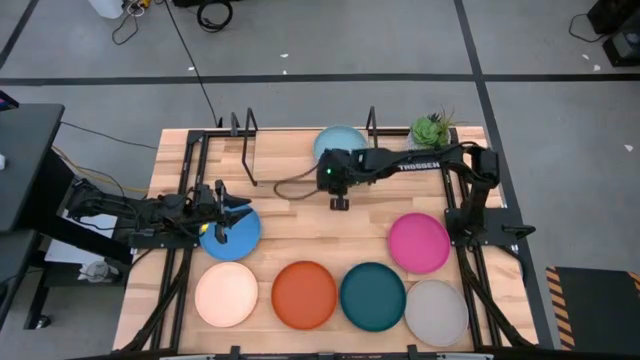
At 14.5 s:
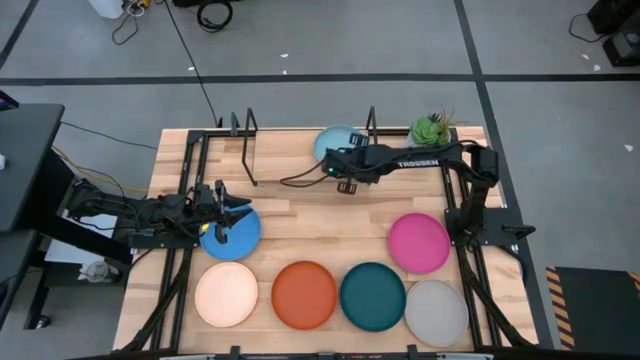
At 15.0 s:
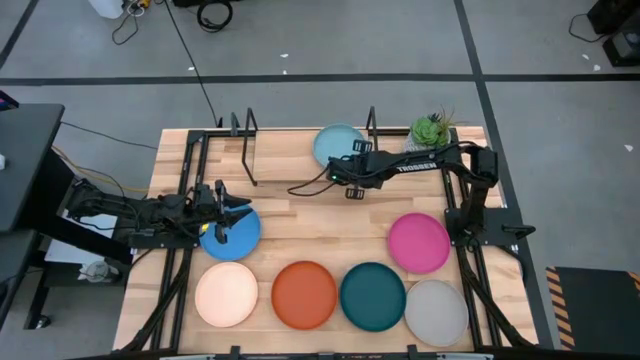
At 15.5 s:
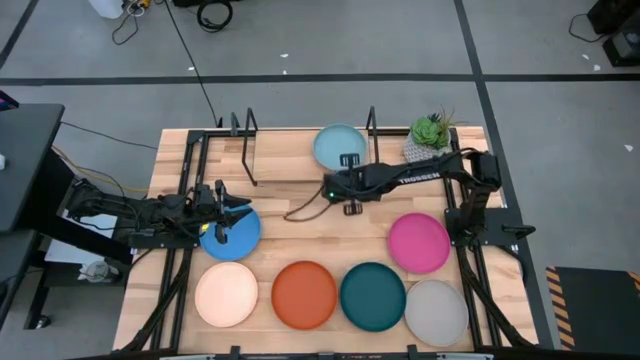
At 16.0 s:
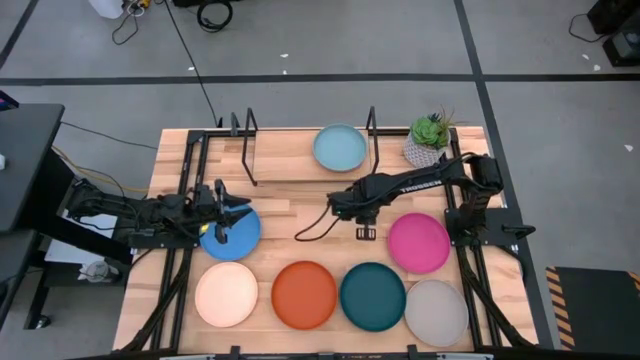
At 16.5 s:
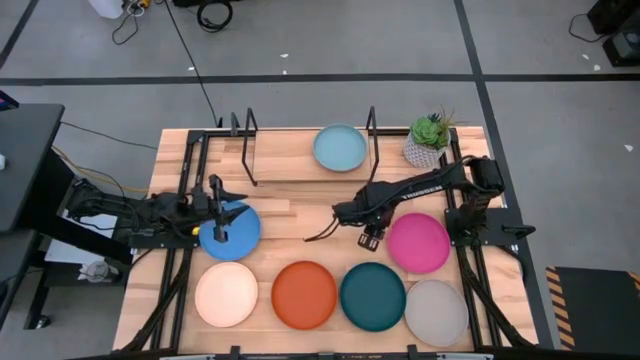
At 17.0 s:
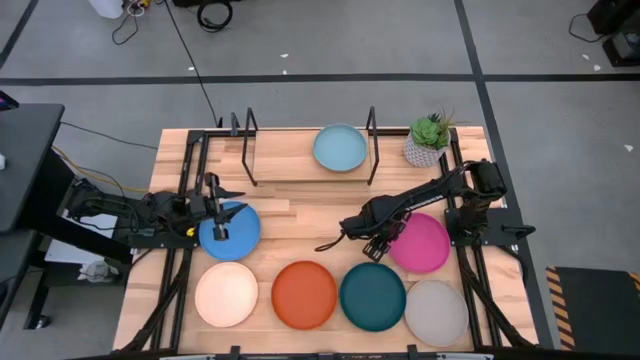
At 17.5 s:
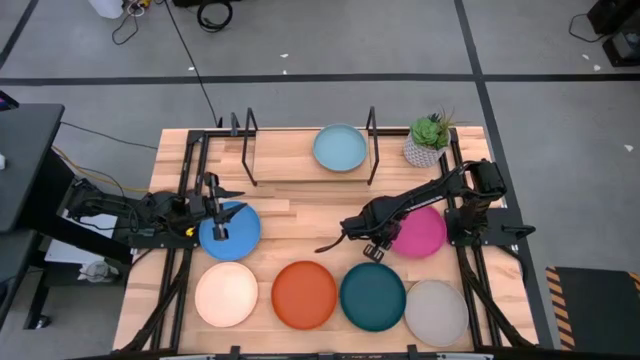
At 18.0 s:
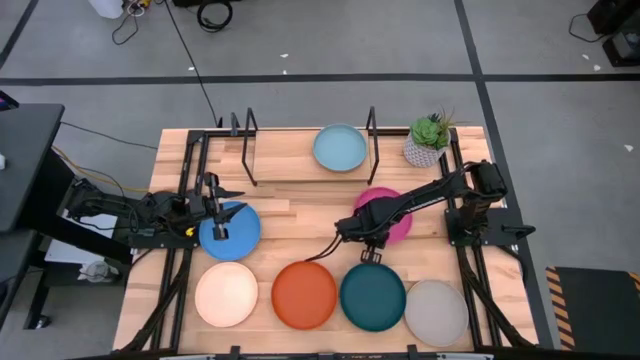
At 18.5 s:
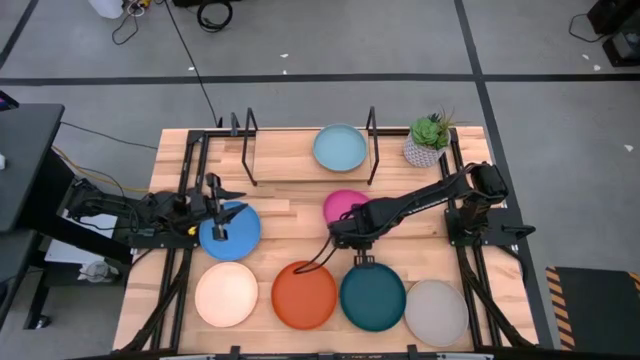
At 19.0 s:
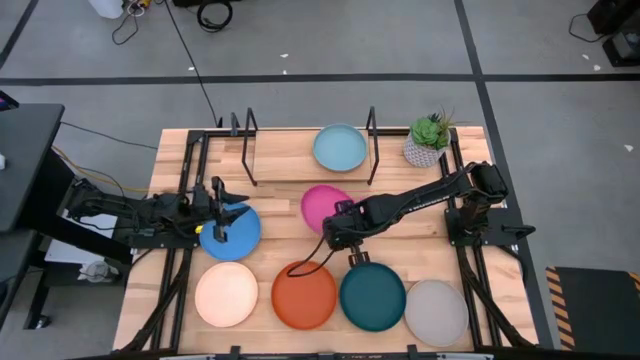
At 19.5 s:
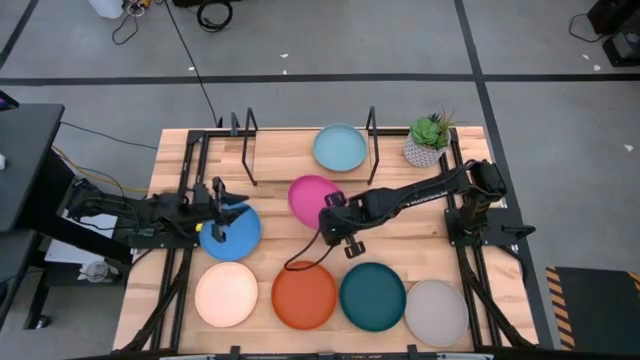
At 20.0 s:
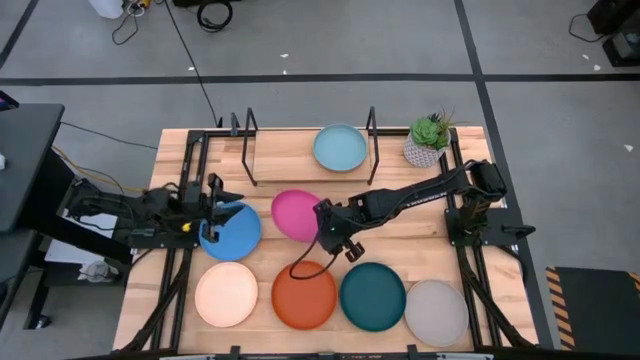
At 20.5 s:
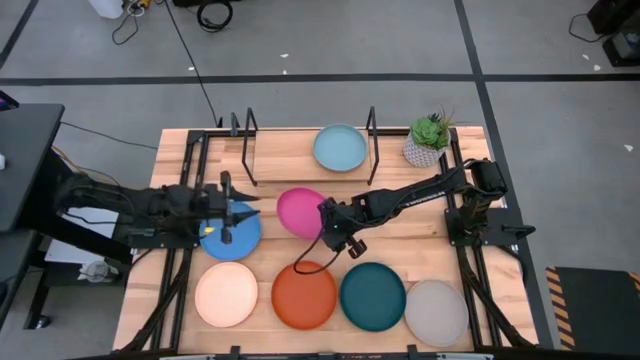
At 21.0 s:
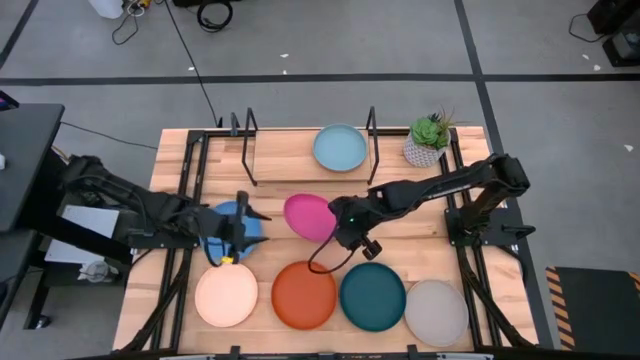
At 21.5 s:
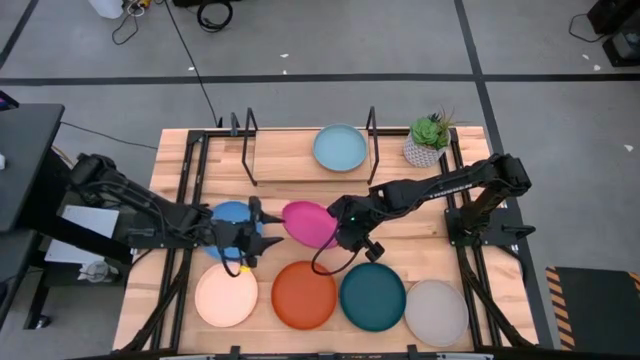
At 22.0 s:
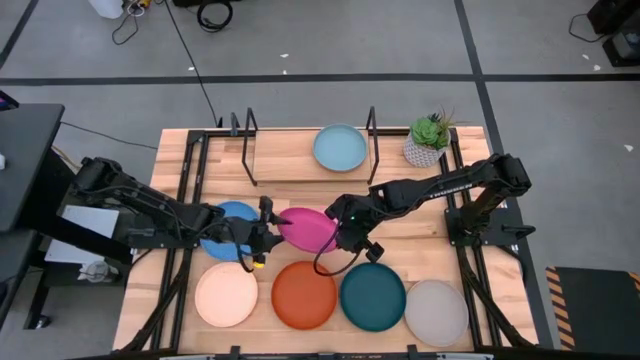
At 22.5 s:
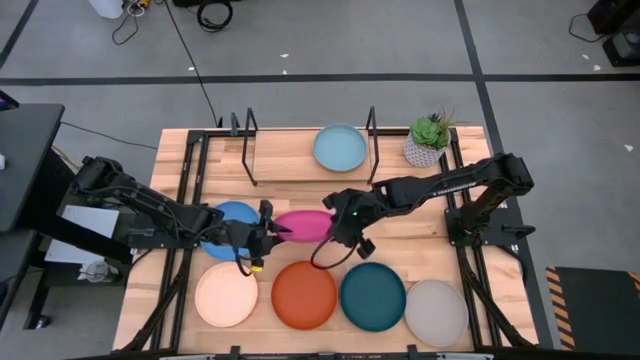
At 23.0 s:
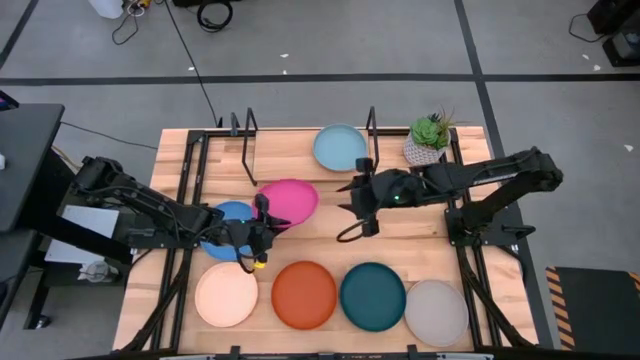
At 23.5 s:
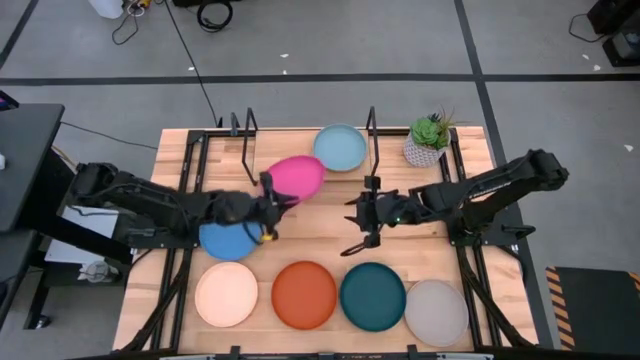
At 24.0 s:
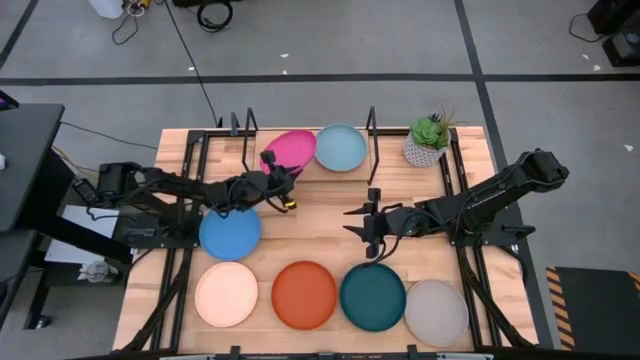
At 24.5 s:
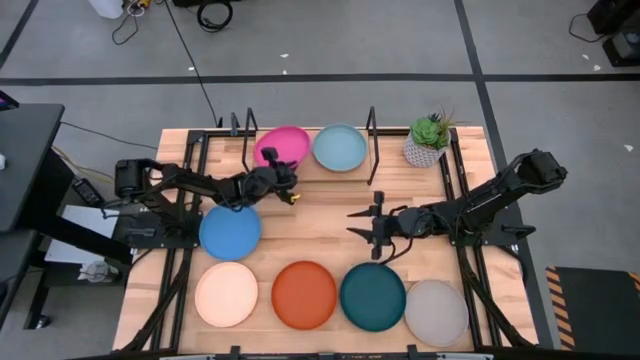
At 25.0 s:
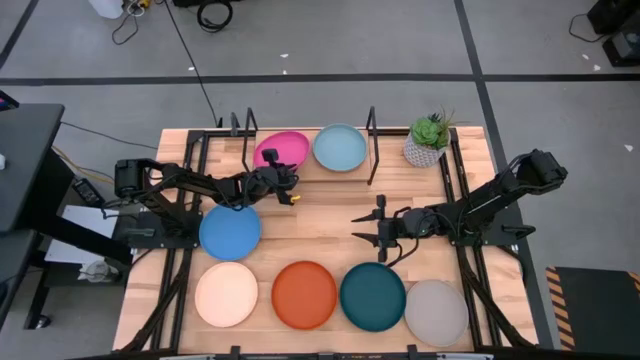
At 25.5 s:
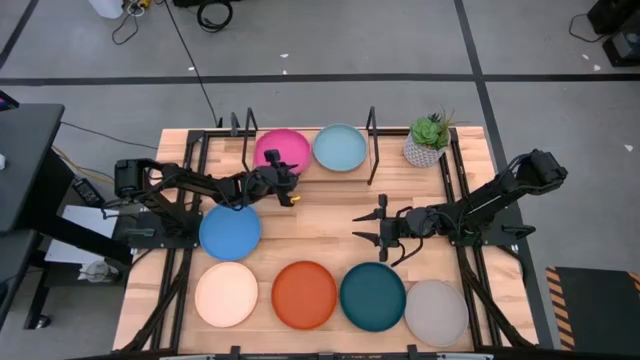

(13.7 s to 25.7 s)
Task: Place and stack plates onto a shelf
Put the pink plate on the shelf

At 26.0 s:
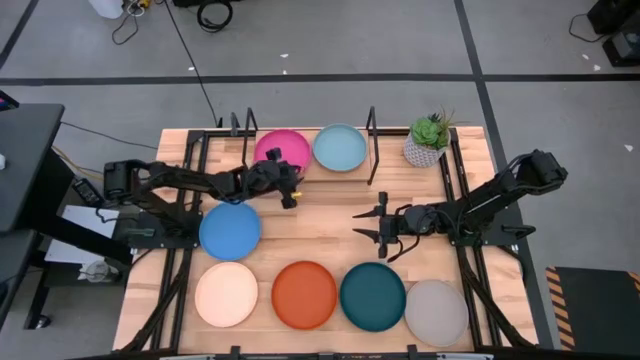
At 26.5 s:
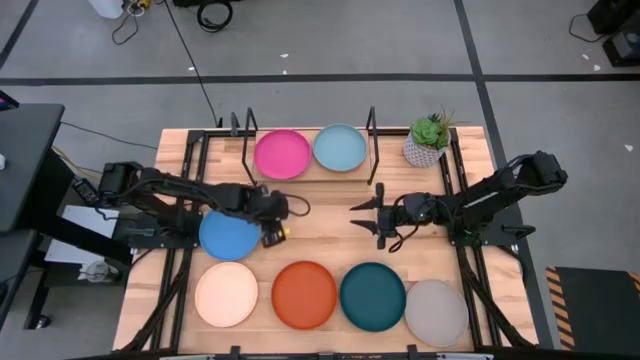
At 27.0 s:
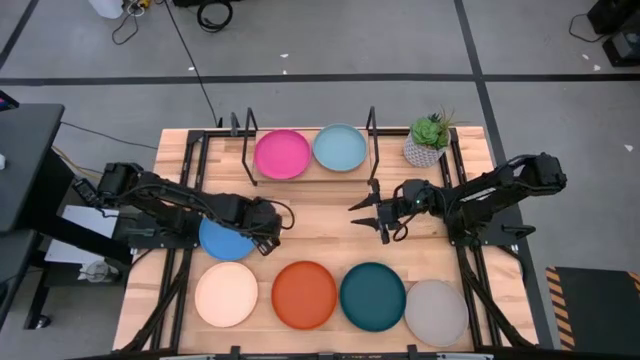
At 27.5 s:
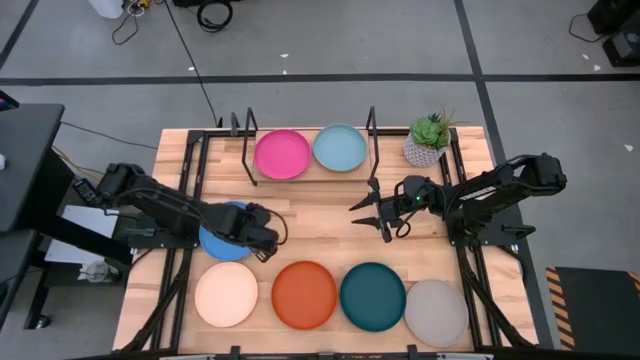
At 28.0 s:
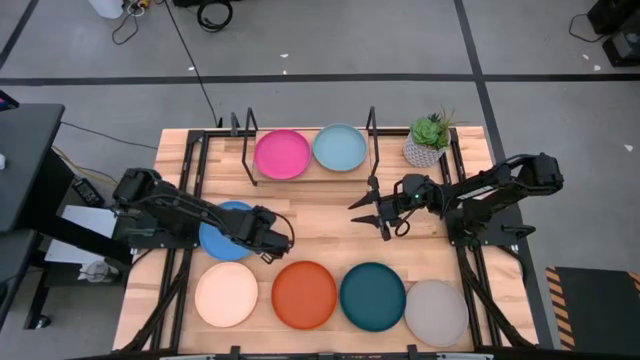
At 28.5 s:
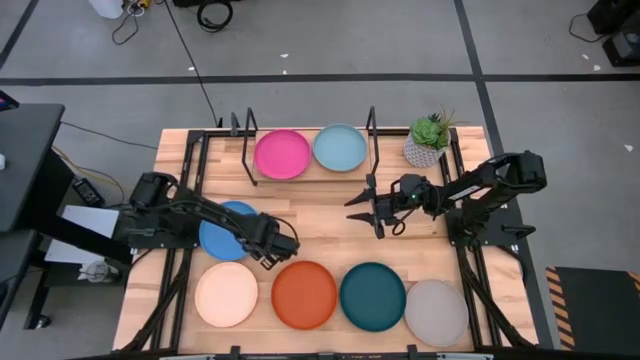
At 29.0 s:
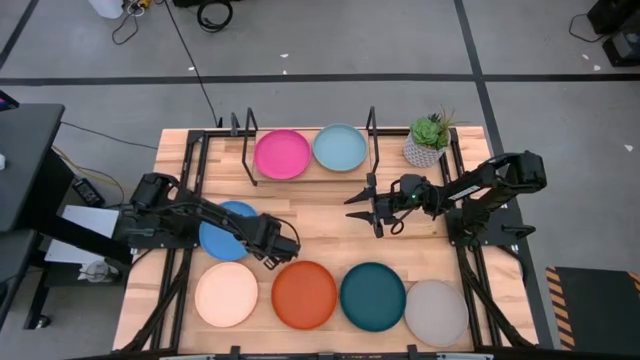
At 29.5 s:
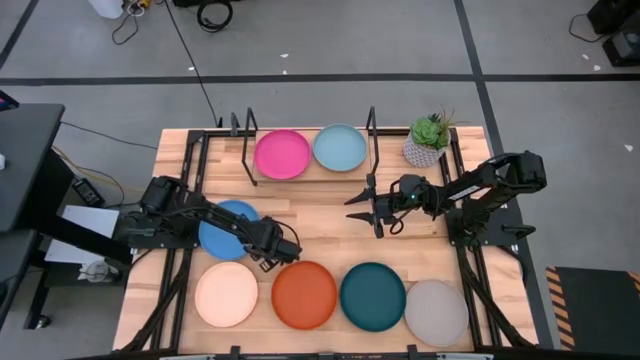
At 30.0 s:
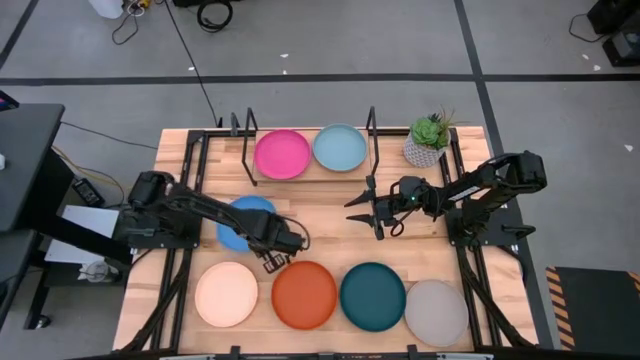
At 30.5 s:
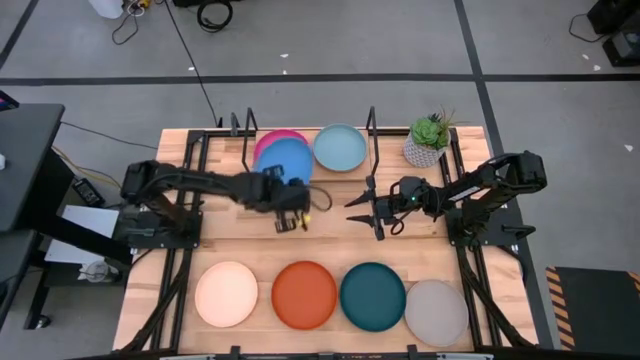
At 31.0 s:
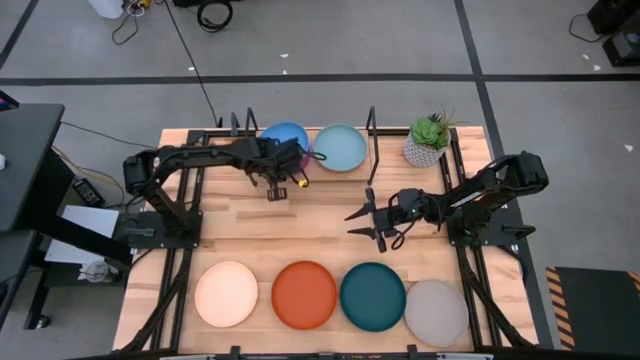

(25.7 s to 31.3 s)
Stack the blue plate on the top of pink plate on the shelf

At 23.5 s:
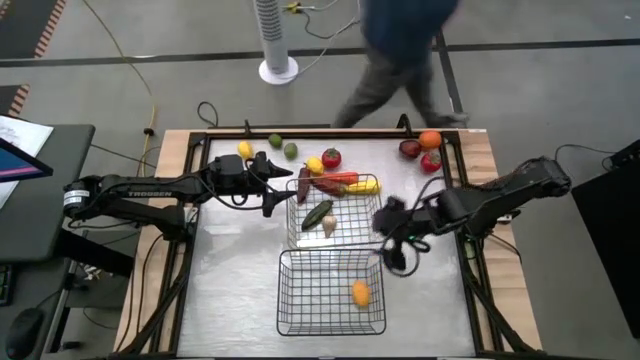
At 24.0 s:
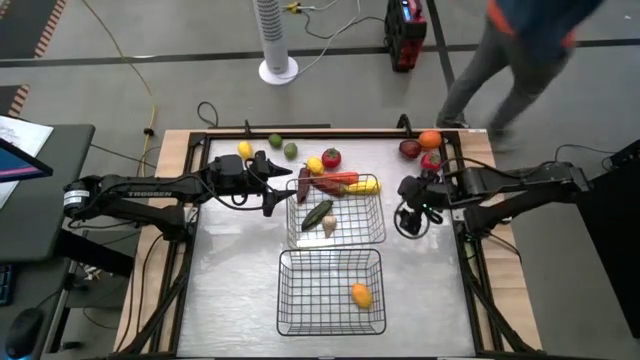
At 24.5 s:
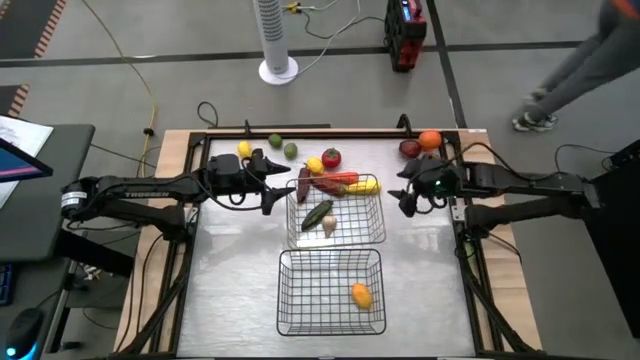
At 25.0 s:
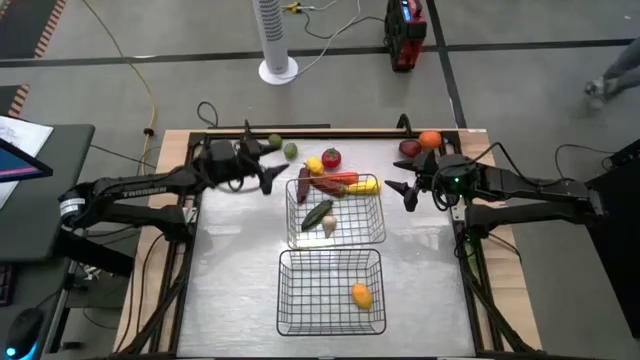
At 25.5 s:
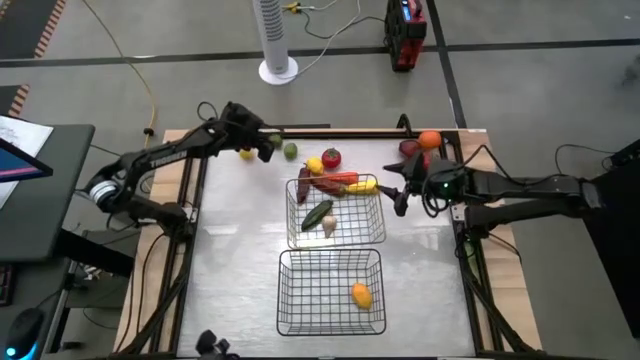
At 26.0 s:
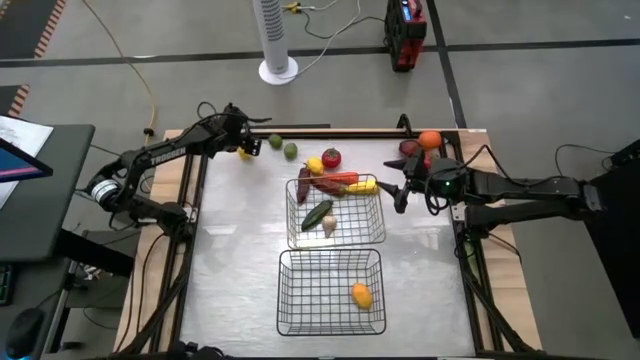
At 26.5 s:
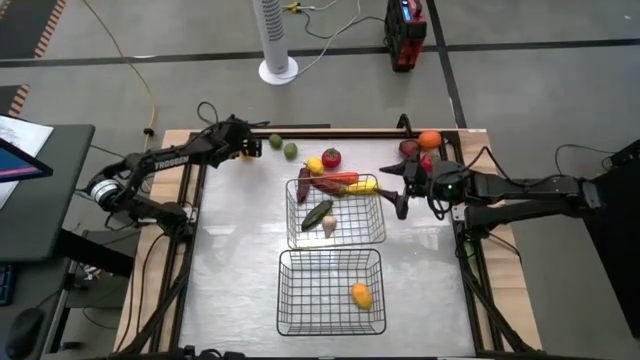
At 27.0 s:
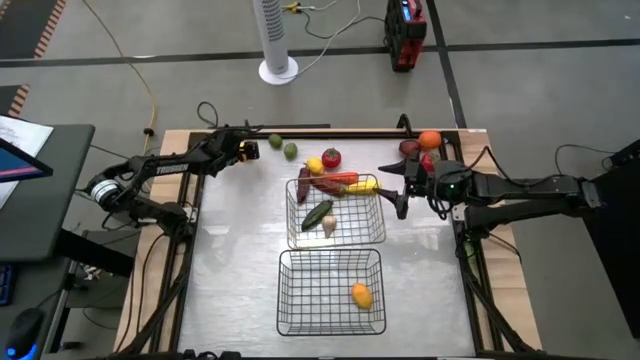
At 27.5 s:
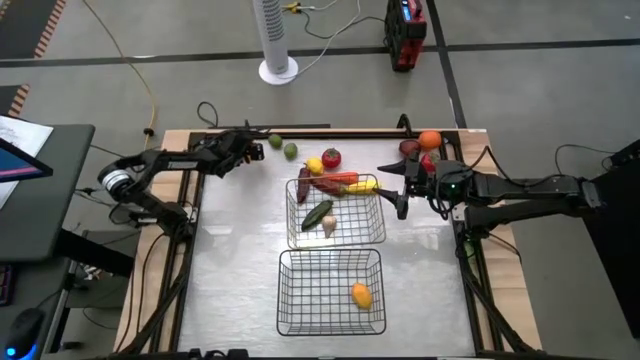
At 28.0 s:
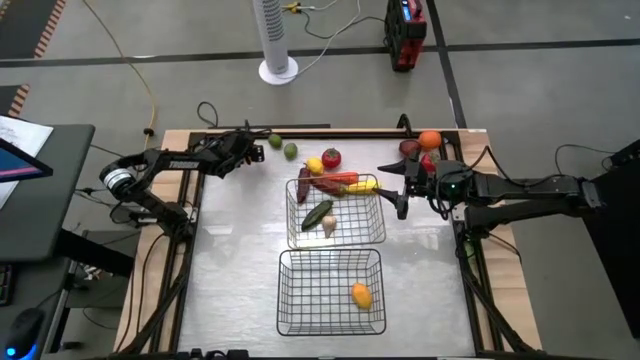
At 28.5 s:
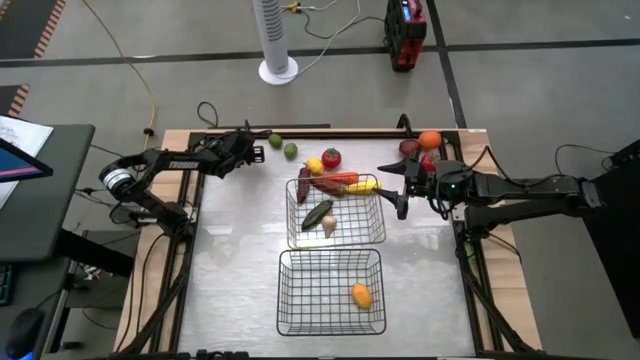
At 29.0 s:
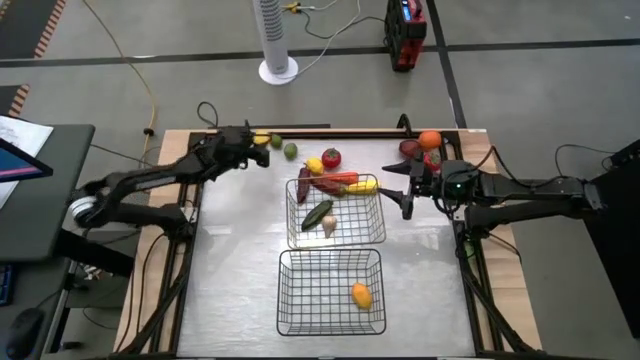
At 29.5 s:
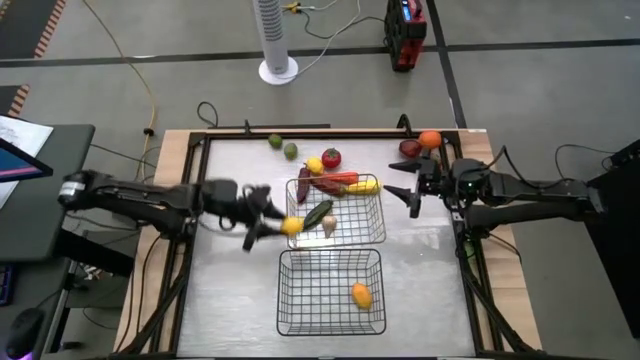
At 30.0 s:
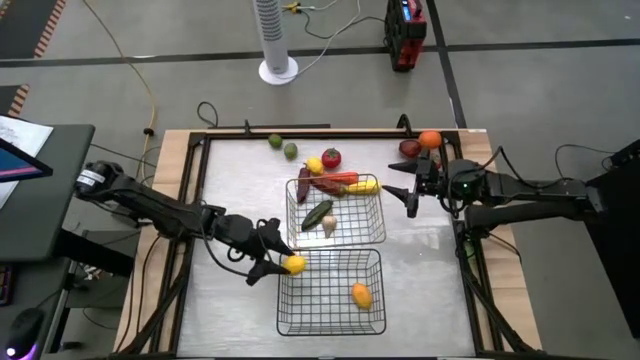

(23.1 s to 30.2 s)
Task: Sort produce into baskets
Put the lemon into the bottom wire basket
